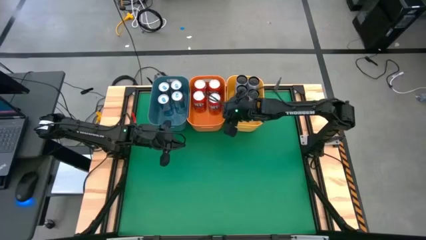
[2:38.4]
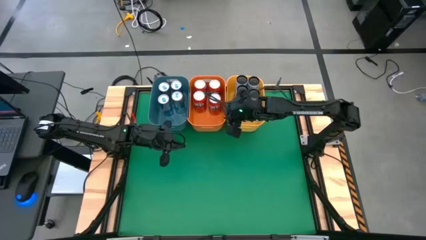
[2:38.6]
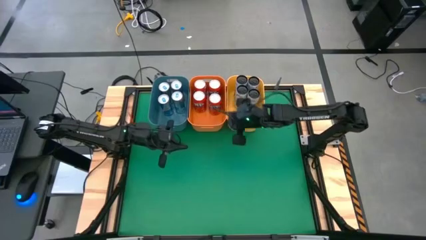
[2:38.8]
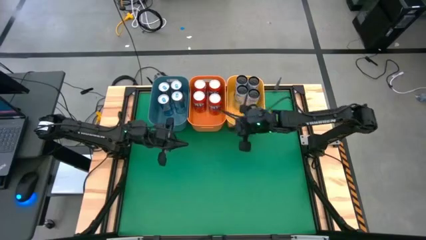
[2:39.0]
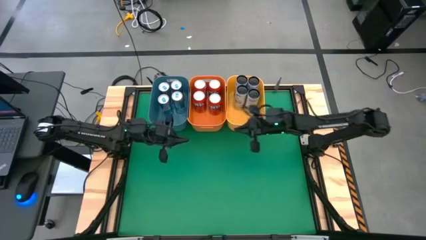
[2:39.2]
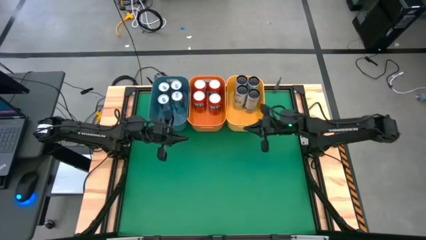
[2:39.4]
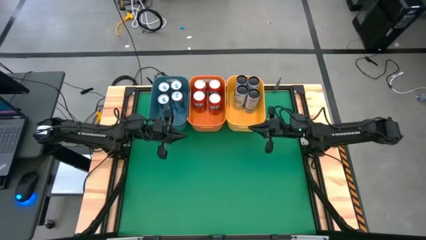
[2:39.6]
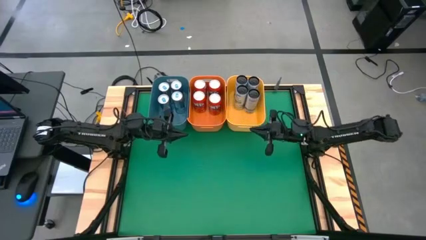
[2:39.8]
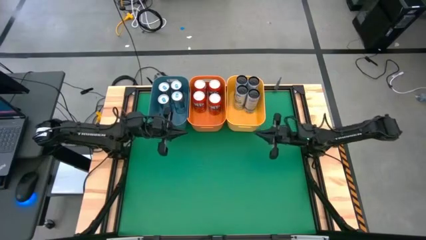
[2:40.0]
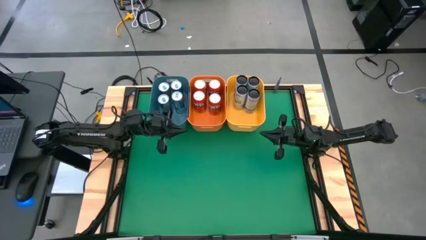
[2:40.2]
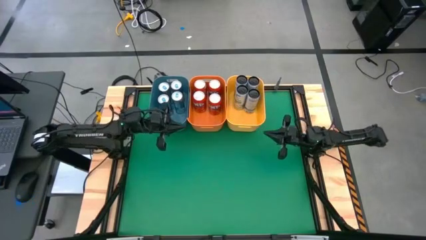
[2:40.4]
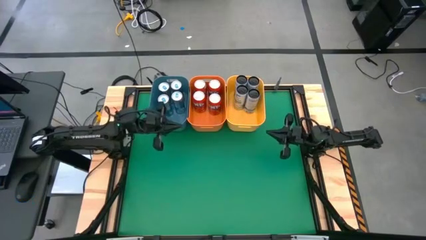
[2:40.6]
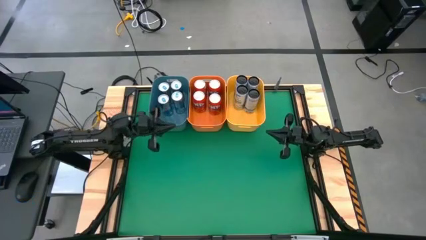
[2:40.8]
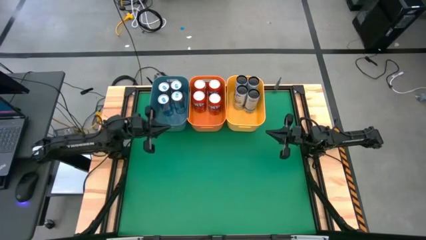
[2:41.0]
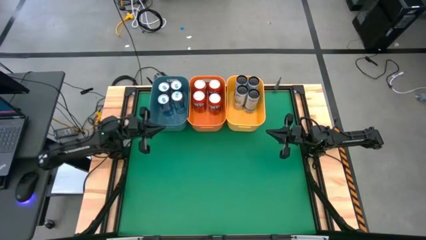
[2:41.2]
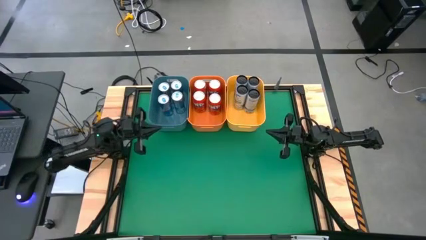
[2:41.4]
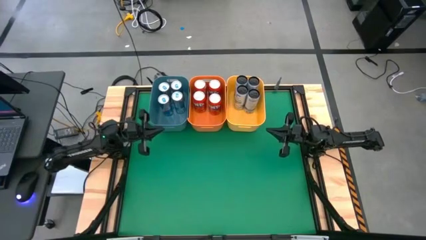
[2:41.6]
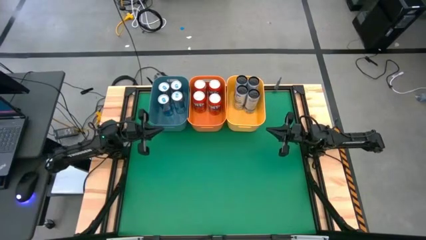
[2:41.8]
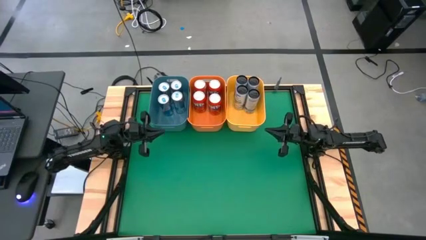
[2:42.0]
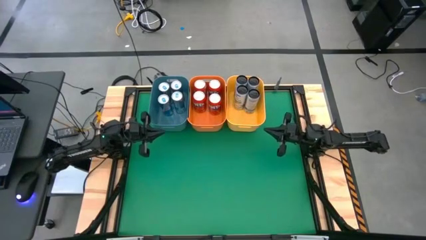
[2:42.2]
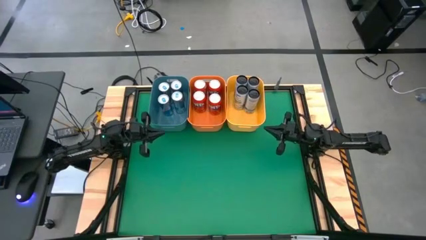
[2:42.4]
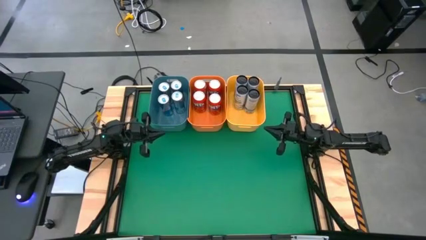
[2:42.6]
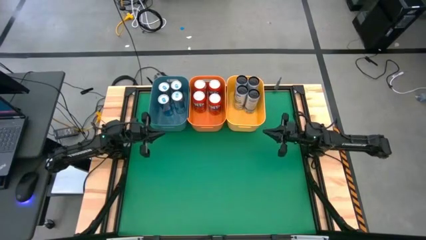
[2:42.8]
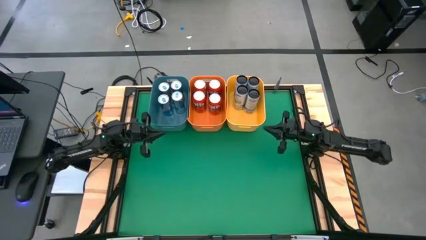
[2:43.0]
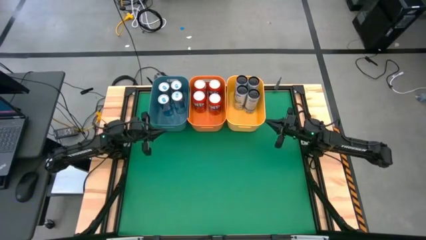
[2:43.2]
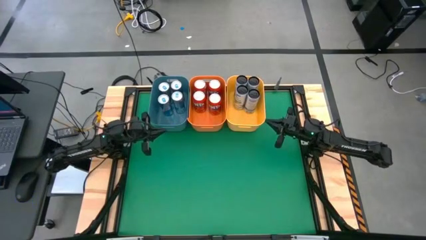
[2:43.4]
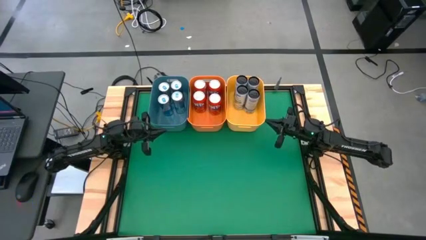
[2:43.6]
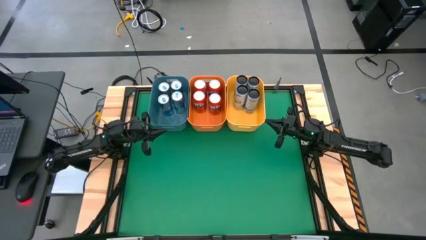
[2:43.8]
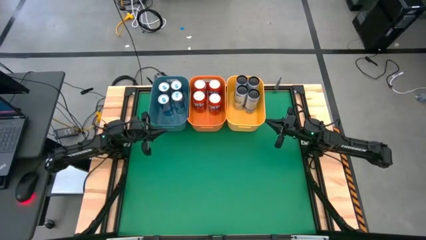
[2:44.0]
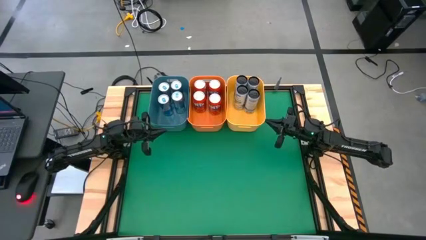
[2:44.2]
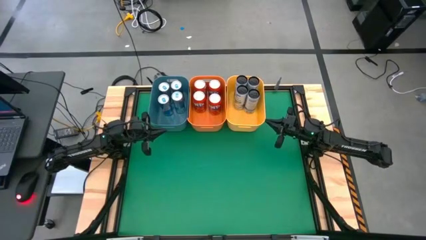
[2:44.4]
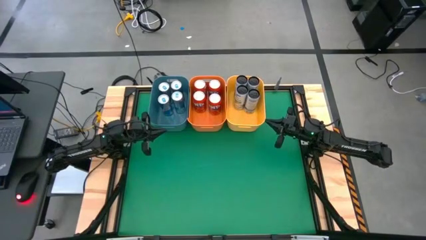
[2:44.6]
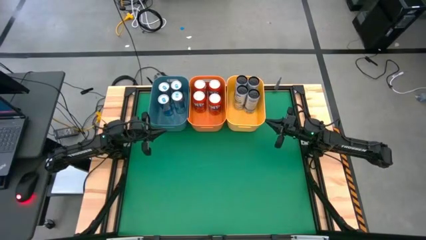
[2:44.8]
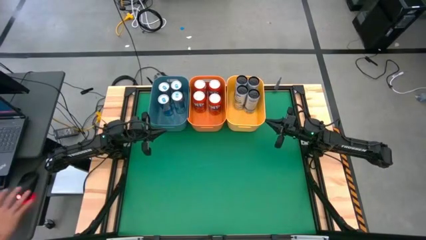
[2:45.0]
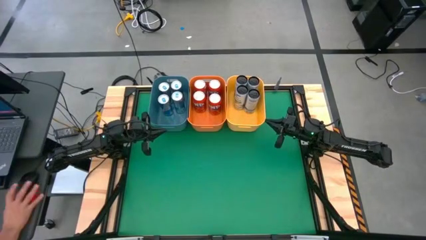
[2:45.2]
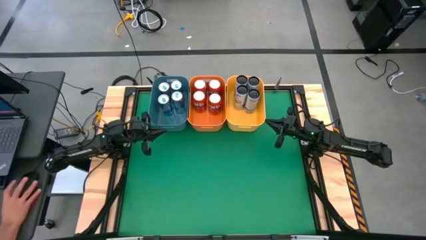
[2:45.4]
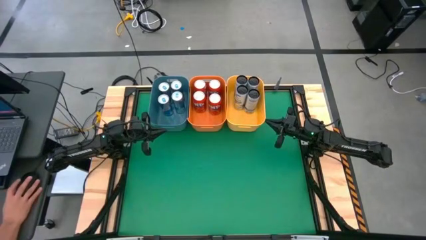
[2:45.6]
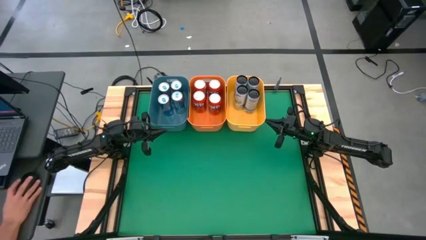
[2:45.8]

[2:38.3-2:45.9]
Task: Sort soda cans
Return to Home Position

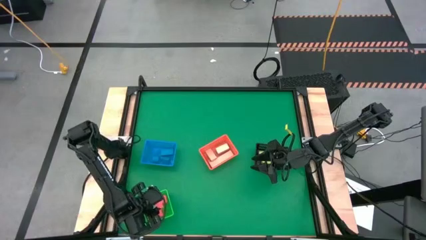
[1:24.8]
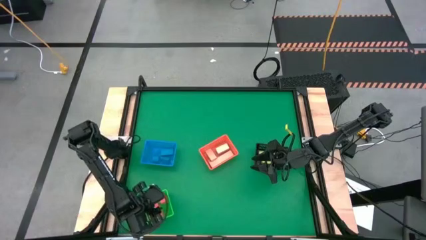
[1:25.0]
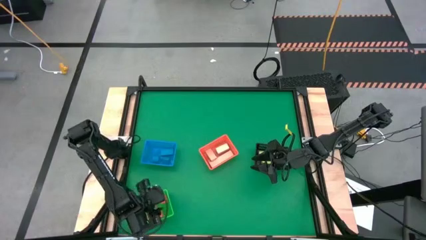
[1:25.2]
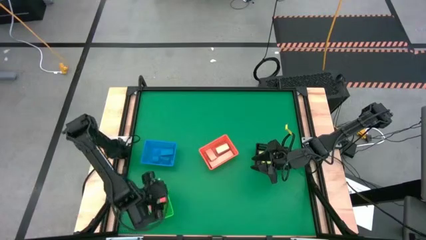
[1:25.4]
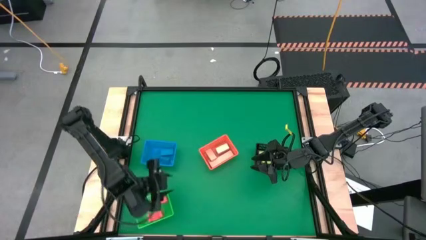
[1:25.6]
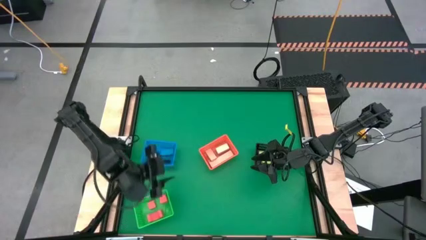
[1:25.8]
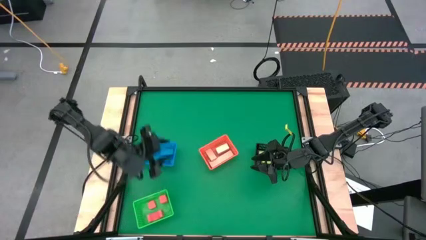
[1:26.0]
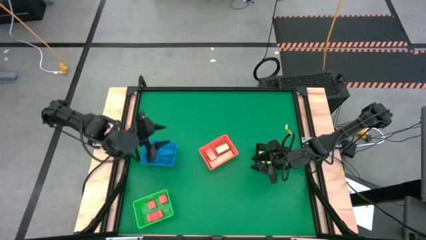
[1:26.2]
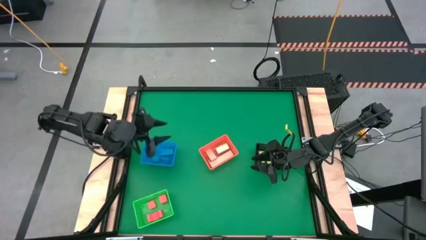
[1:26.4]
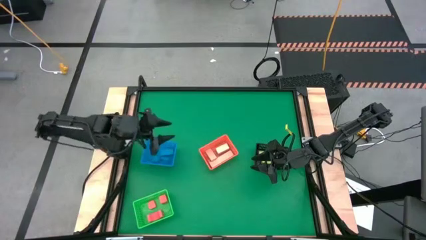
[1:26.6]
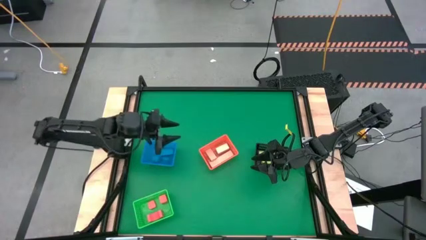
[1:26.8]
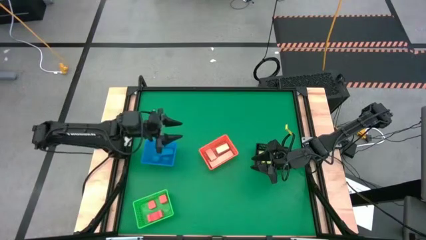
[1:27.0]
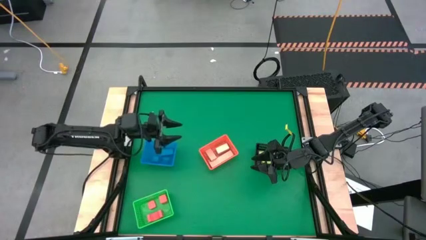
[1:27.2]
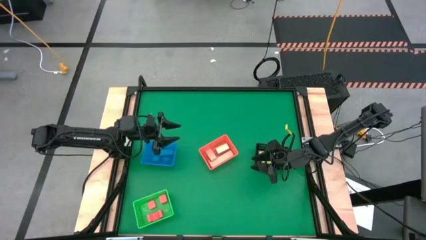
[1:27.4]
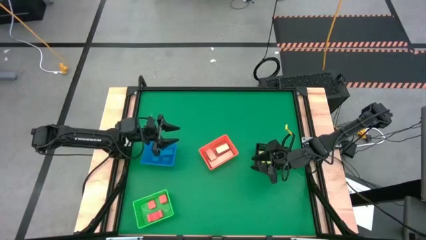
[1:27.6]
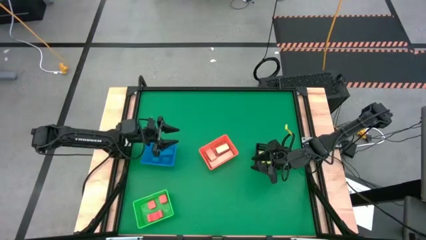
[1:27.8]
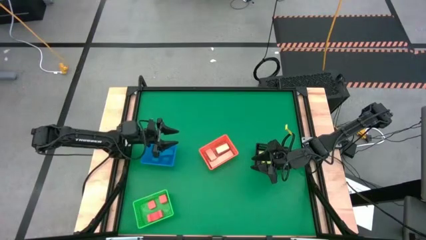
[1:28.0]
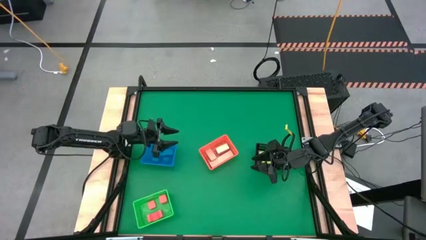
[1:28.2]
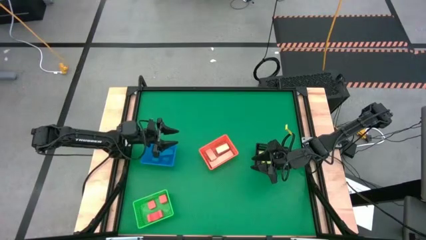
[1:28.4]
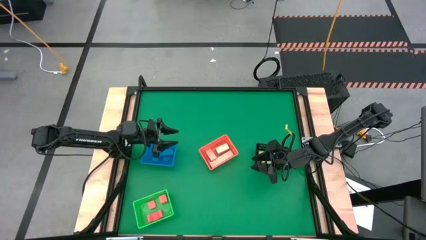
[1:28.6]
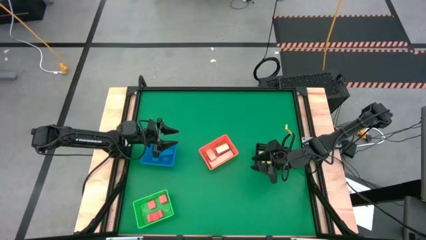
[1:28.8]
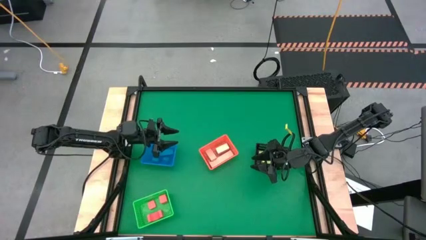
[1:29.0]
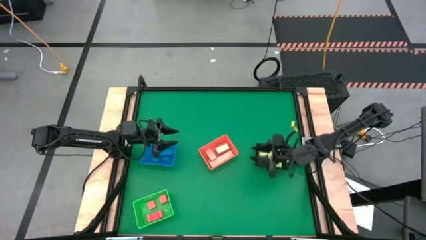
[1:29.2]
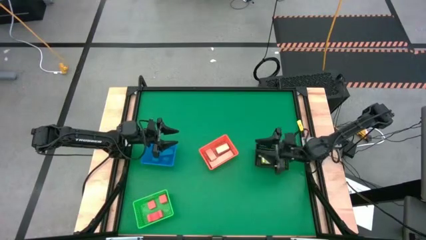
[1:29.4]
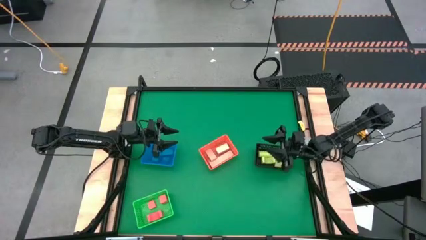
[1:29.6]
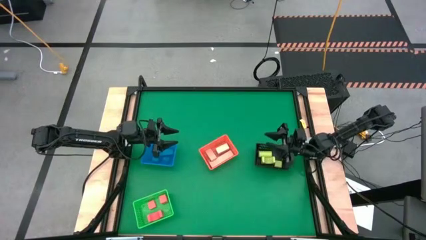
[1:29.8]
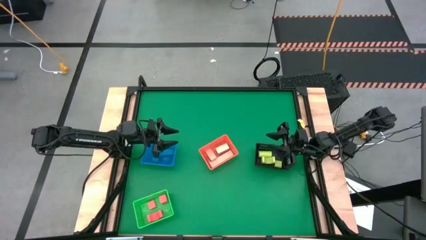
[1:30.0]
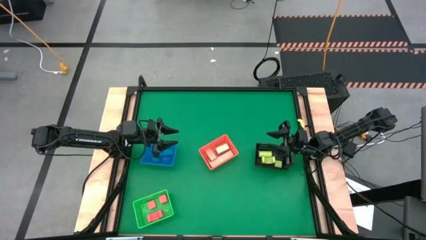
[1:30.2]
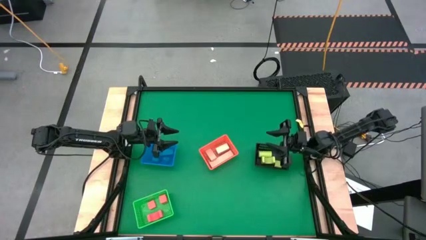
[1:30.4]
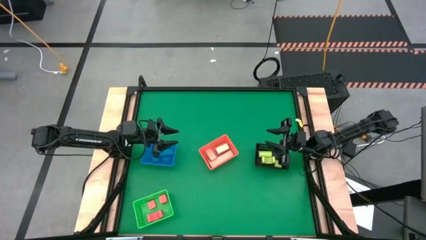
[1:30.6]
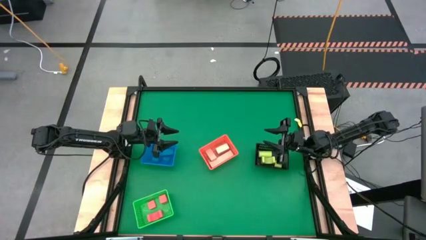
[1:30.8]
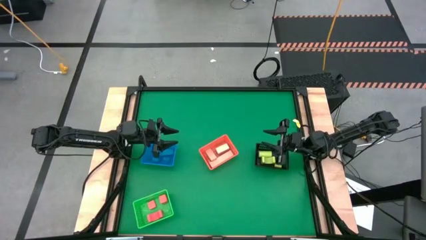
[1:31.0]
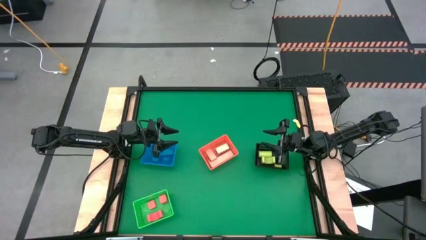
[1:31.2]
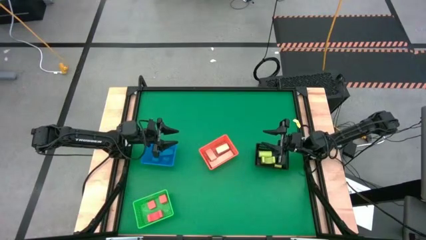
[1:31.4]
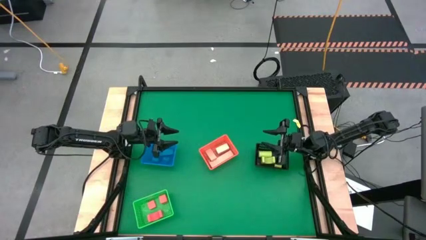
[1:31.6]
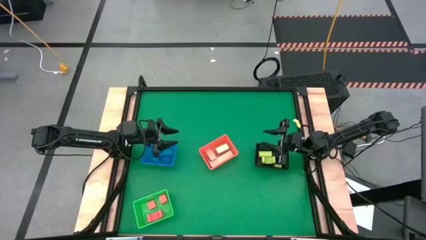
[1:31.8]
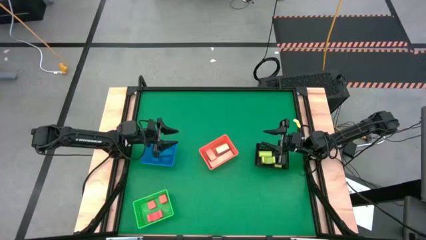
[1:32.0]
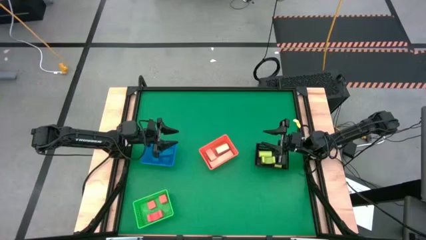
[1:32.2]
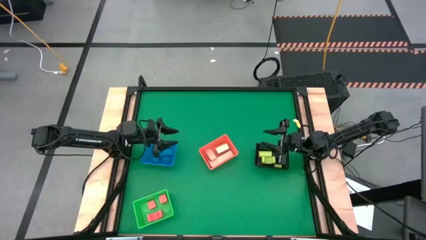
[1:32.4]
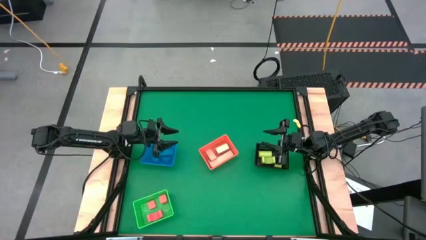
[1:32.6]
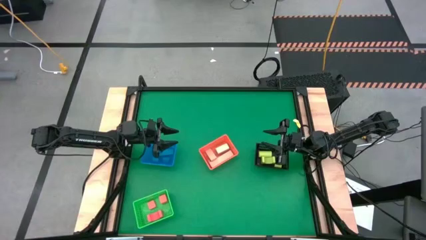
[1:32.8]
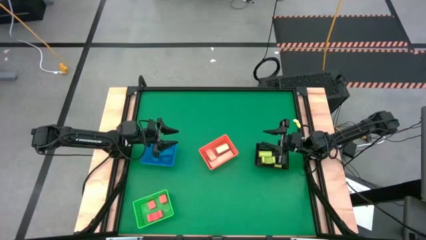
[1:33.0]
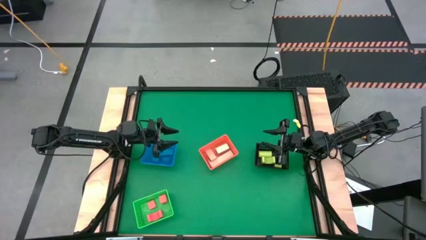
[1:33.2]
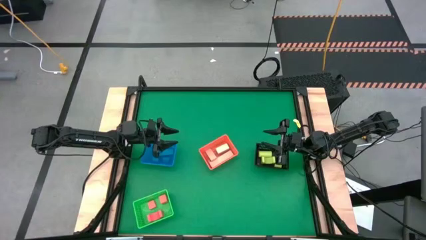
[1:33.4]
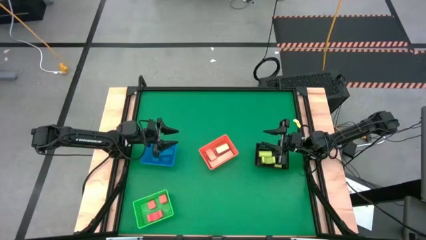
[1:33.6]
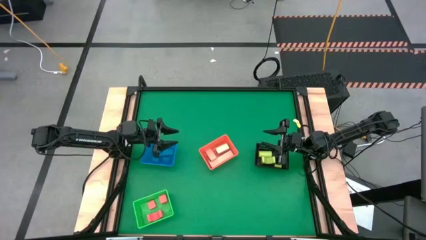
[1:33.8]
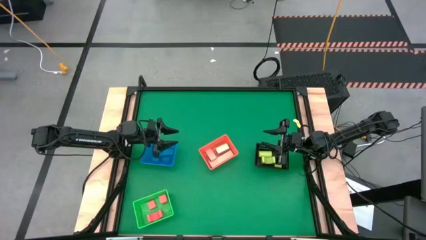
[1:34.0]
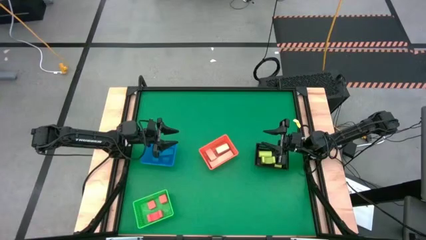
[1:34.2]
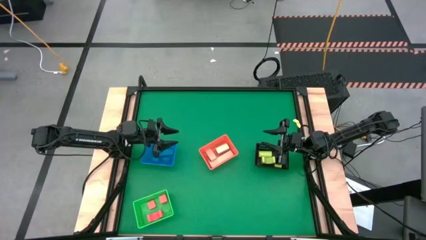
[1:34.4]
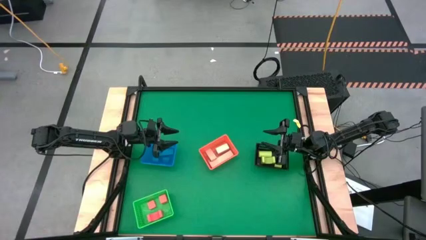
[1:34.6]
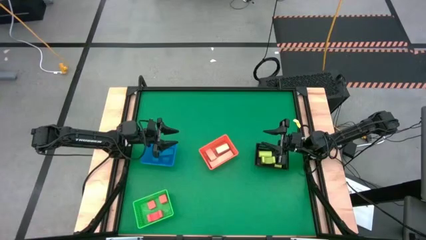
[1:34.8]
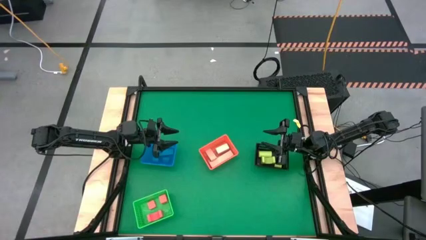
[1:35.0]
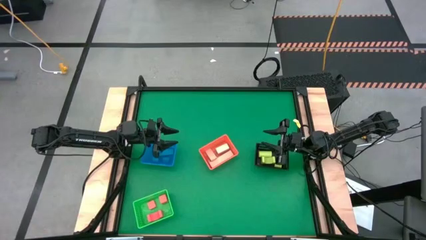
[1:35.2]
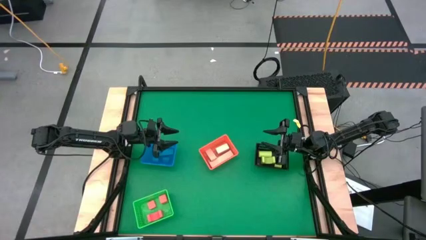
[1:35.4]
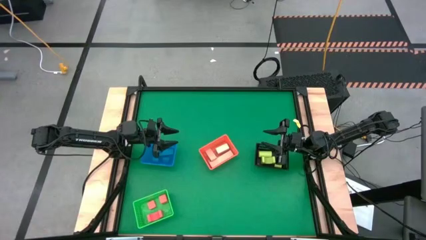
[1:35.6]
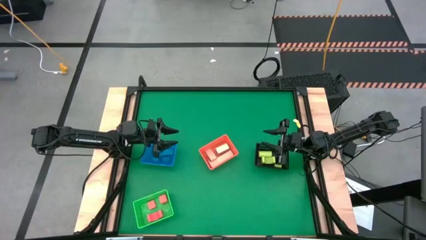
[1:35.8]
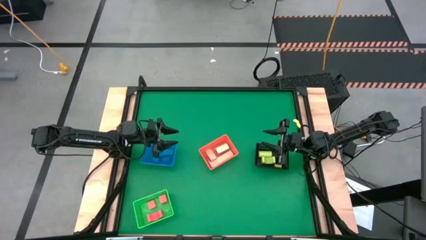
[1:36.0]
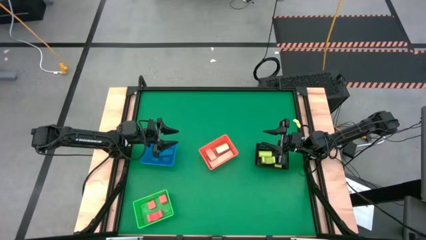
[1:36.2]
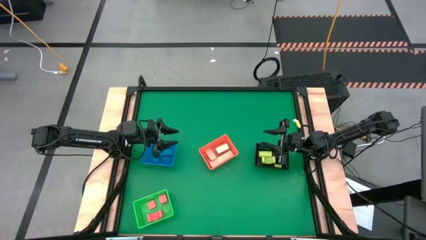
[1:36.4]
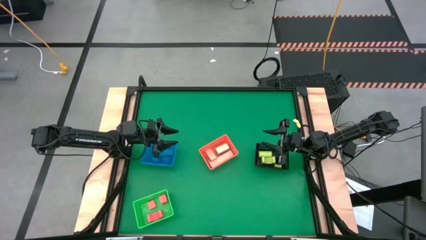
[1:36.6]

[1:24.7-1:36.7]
Task: Sort & place blocks by color
Return to Home Position
